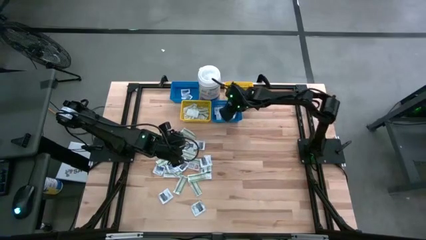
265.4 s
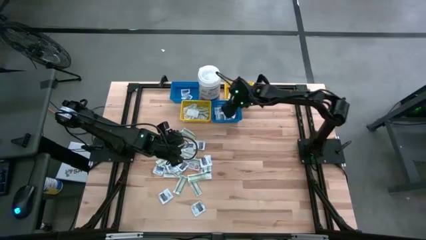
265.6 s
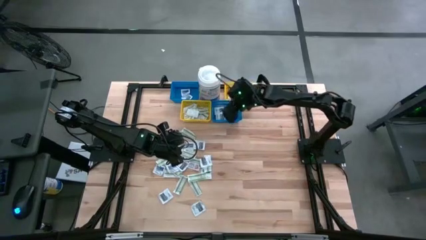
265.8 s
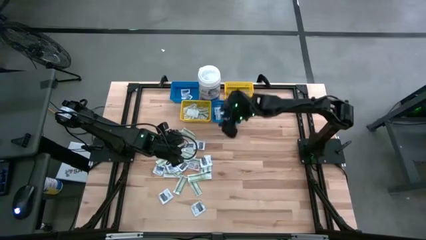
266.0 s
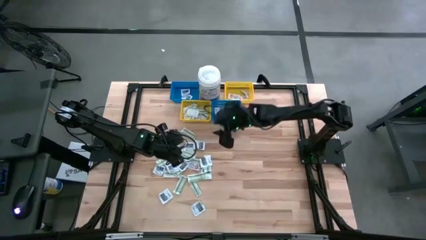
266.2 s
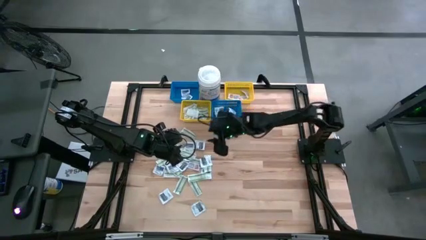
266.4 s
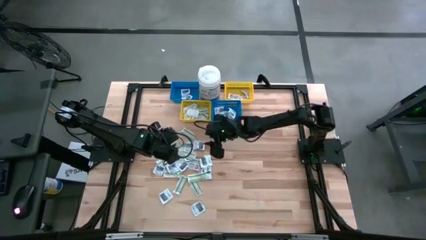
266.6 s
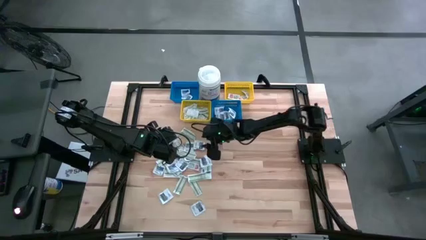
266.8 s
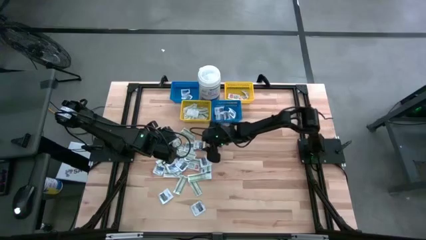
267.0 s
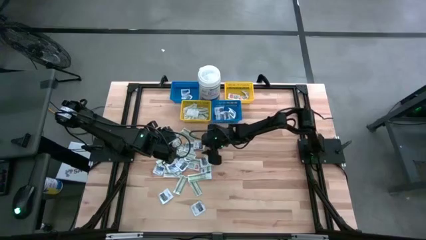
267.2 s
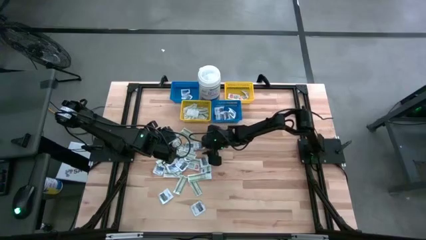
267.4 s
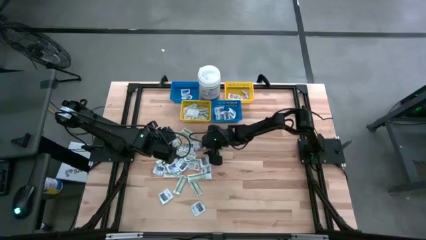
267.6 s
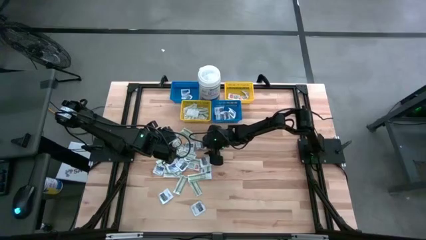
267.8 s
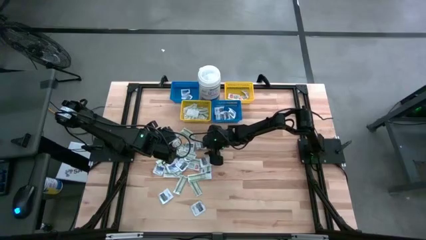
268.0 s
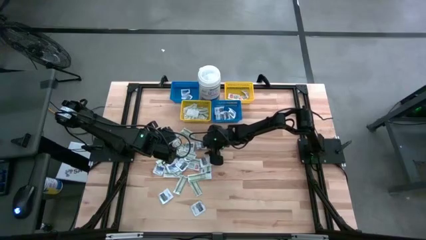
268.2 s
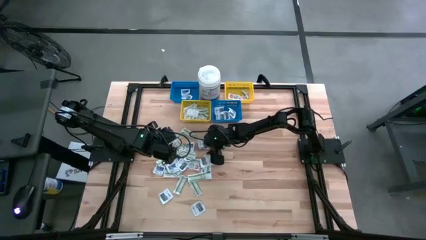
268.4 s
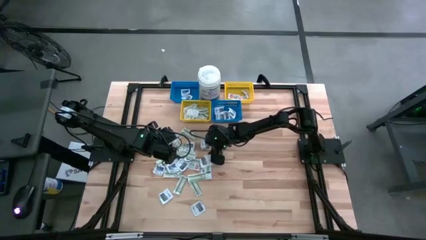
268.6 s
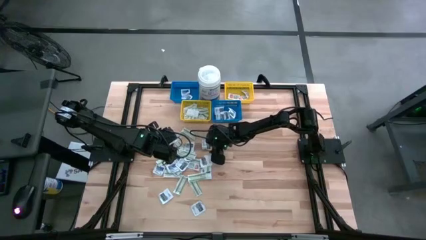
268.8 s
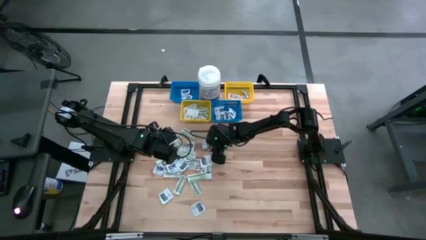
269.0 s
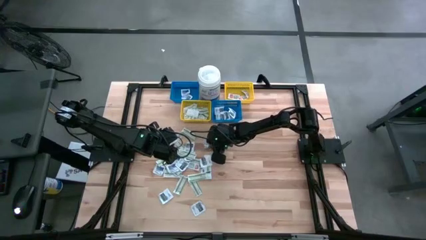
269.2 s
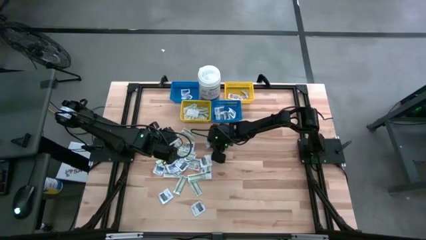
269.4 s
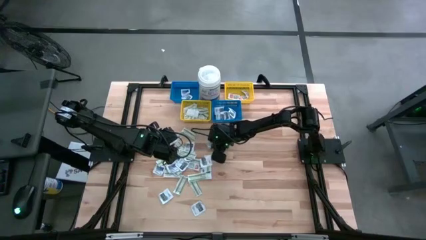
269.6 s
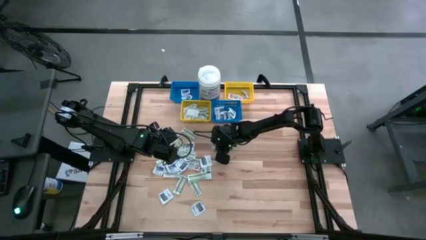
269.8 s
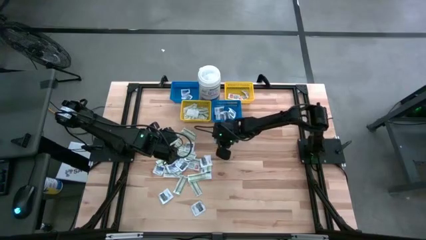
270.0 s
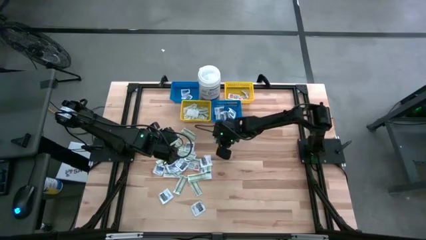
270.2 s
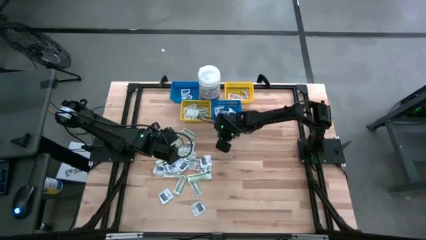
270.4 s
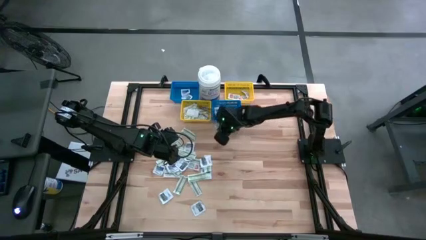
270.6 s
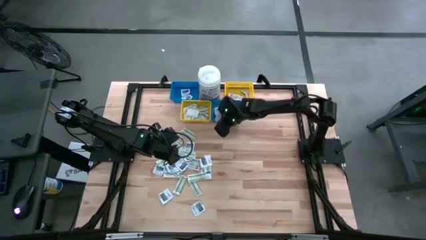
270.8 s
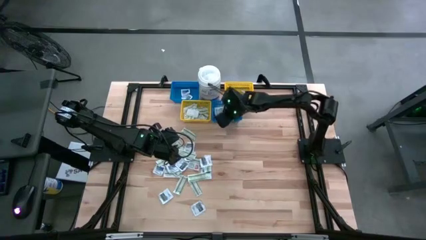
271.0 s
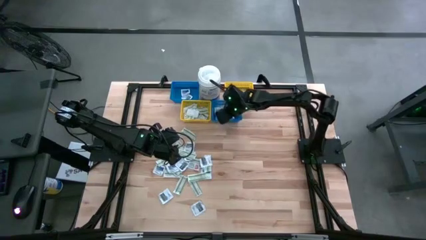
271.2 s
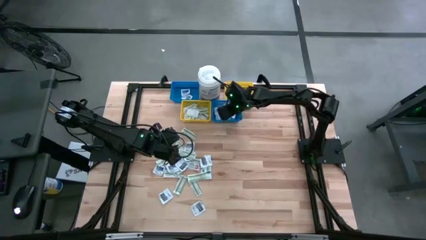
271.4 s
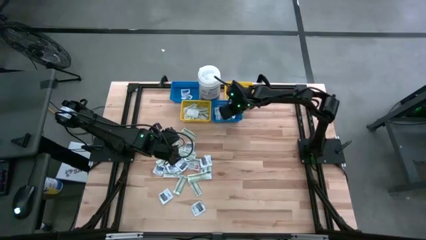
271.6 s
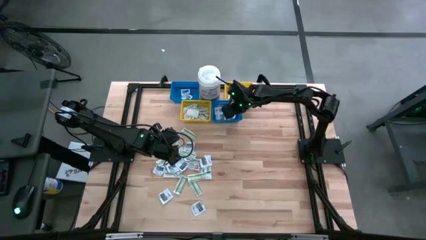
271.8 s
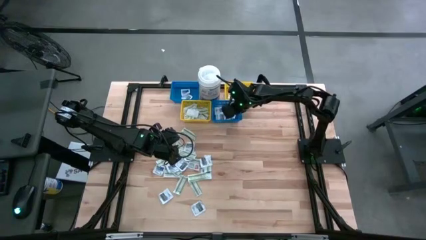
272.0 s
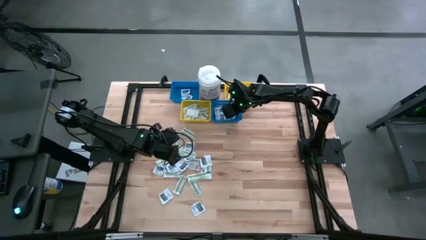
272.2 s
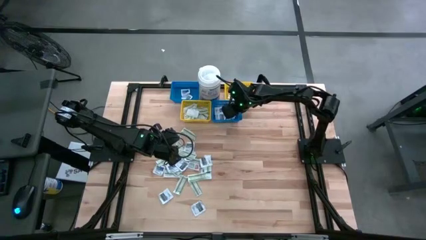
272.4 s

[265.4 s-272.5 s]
Task: Pick & Place First Aid Supplies
Put the black towelette pack into the right blue bin

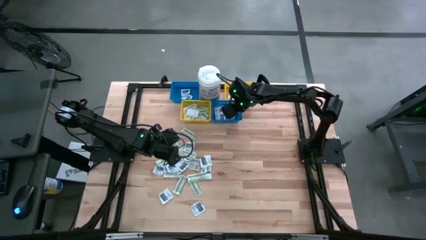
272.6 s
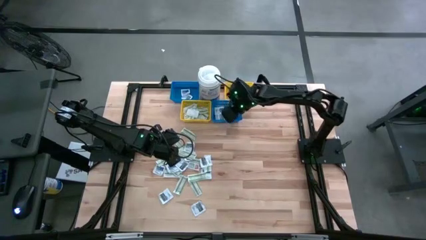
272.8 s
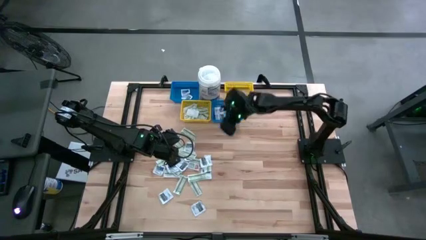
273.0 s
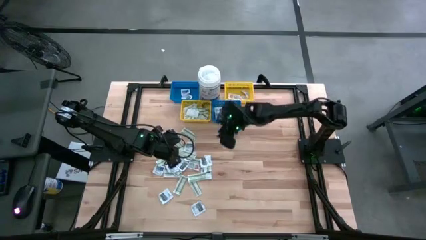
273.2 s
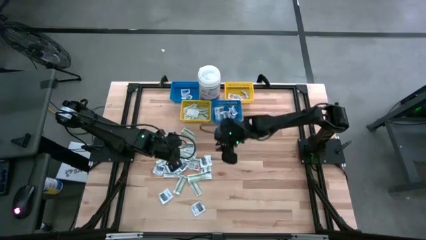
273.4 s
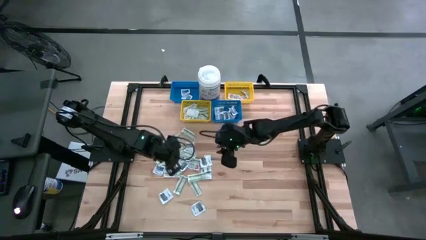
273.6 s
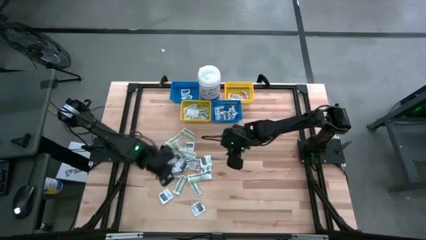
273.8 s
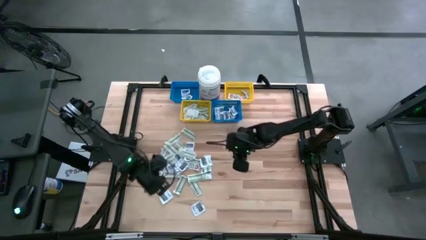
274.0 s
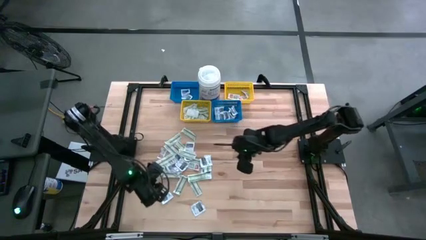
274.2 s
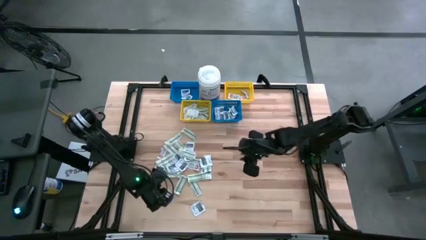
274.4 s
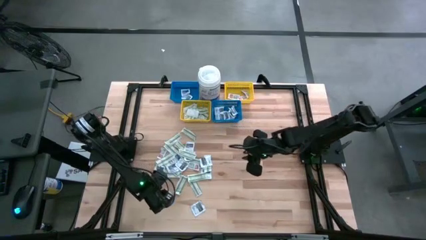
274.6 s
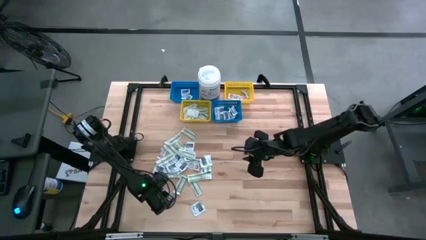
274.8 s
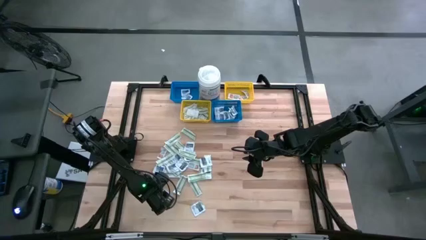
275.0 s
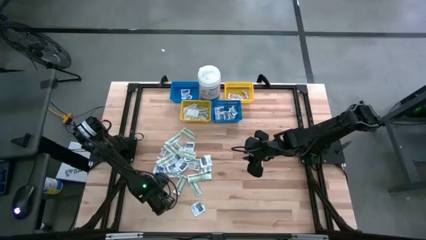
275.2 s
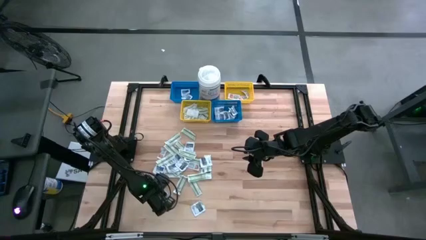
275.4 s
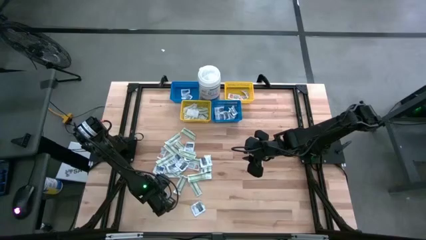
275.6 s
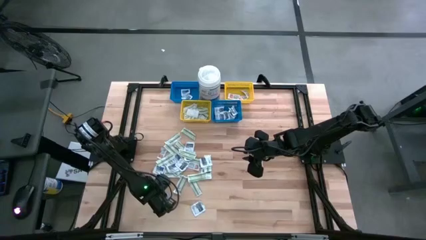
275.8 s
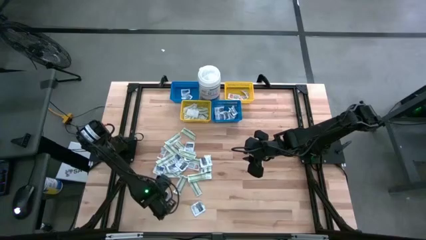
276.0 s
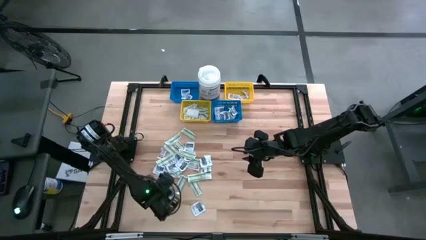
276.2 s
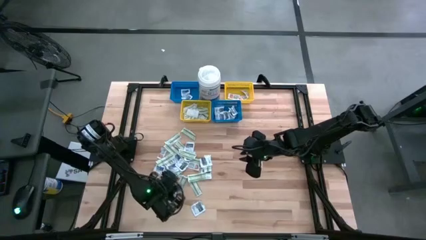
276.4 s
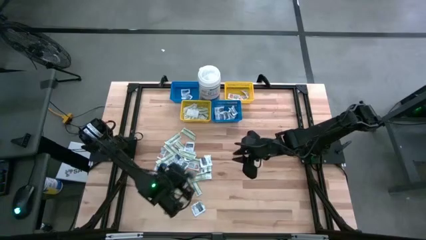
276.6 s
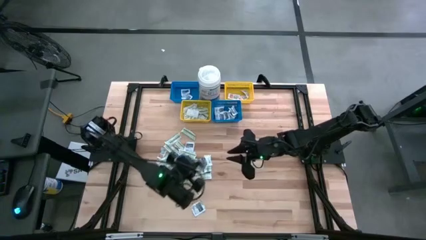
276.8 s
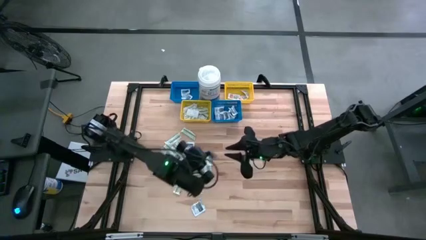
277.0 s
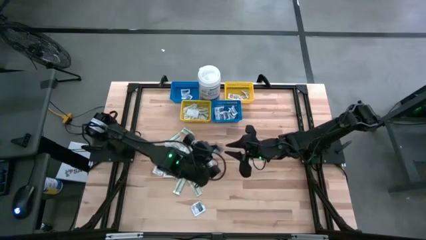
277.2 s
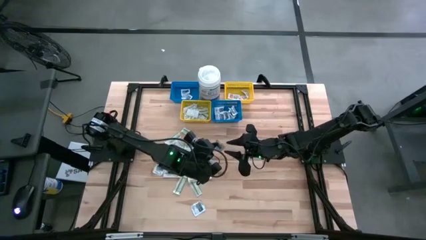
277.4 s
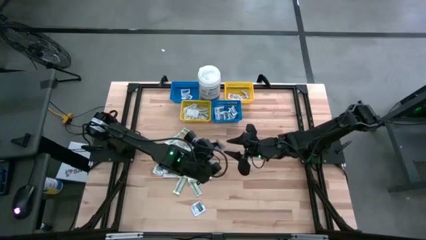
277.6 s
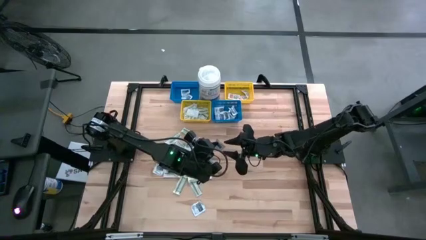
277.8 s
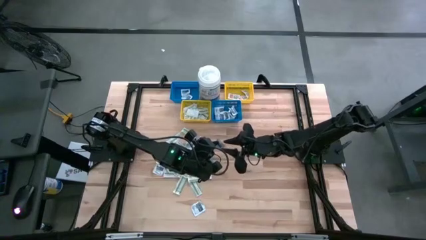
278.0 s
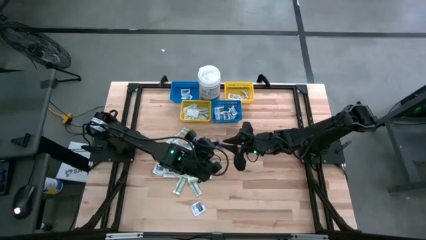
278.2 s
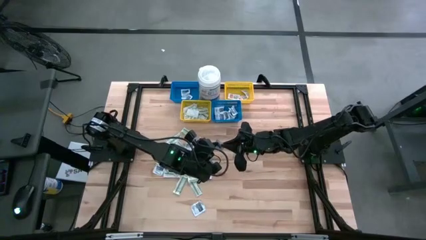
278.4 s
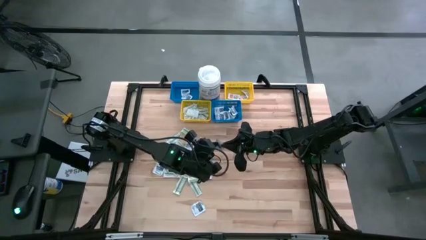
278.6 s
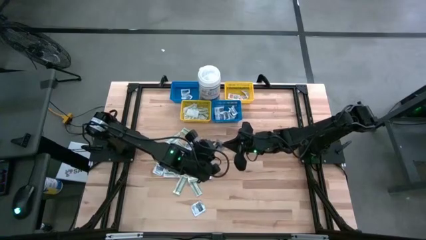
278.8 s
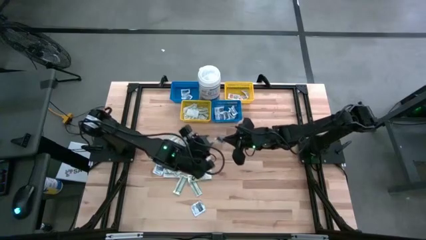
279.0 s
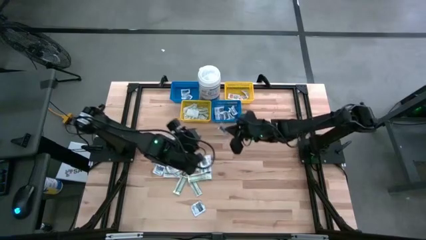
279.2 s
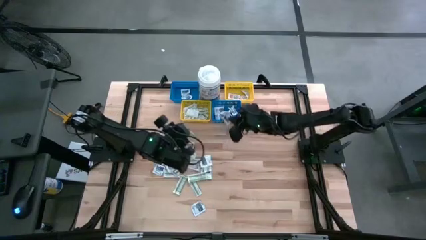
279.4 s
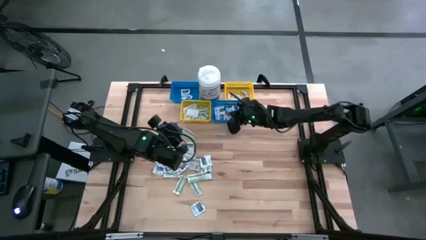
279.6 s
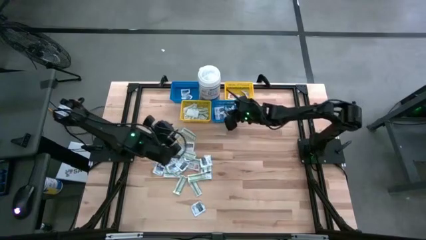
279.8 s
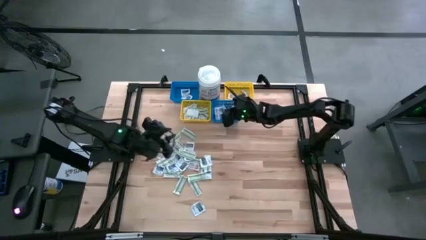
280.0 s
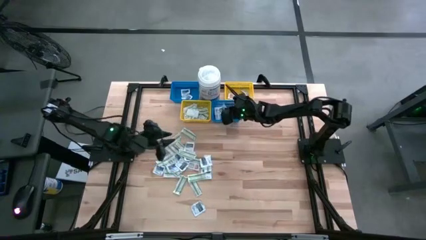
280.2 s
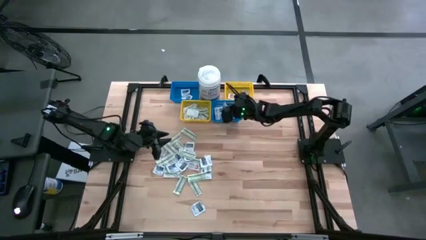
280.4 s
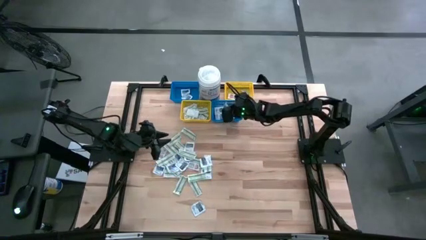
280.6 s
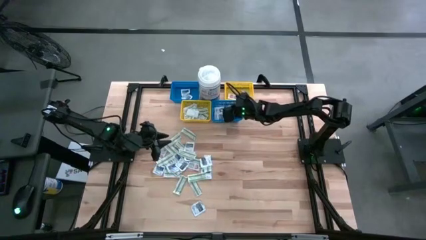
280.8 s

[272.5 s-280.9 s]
Put the black towelette pack into the right blue bin

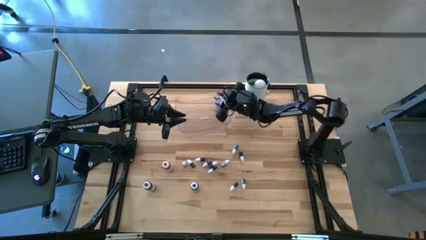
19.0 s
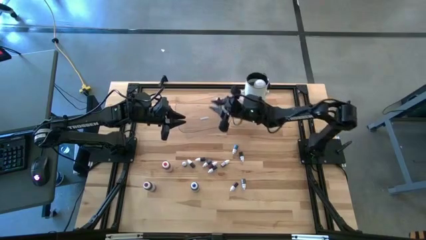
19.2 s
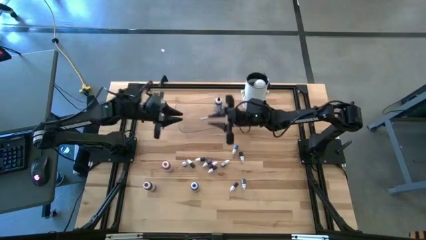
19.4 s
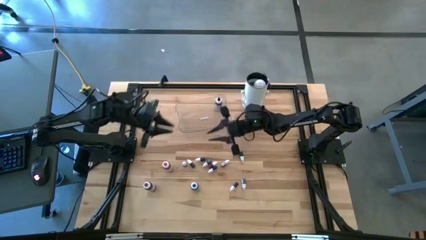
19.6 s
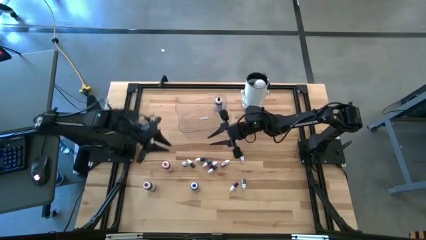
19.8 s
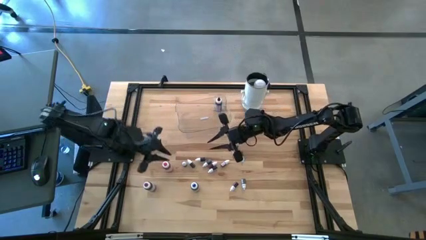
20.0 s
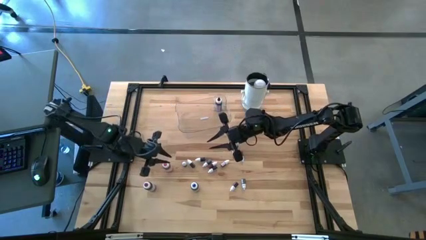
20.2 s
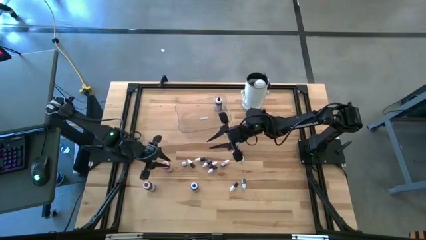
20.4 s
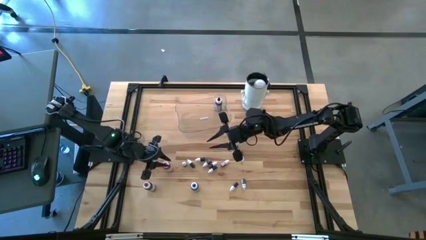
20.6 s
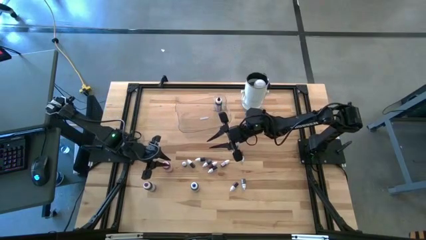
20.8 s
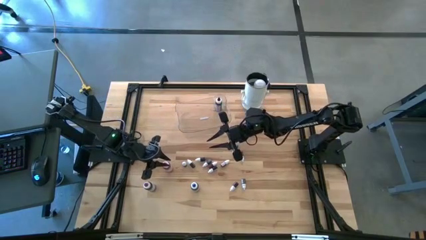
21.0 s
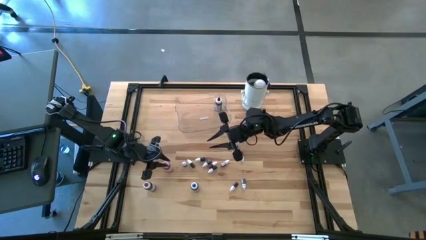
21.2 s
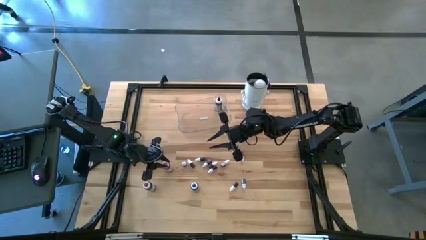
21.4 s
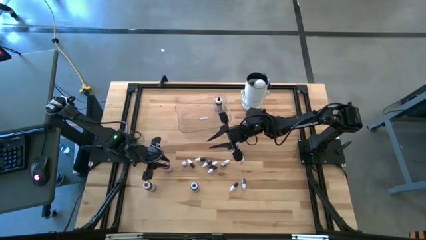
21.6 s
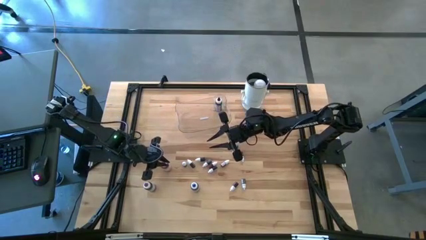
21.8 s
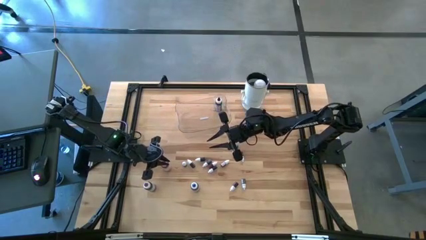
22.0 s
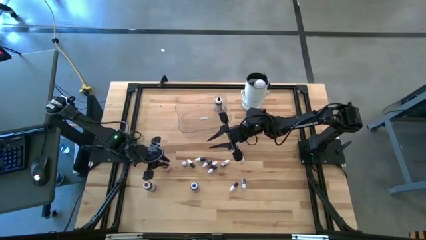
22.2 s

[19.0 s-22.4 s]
Task: Pick & Place food coloring
Put the large pink food coloring bottle into the transparent container
